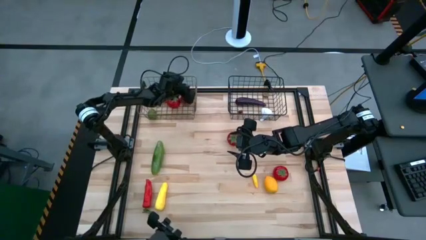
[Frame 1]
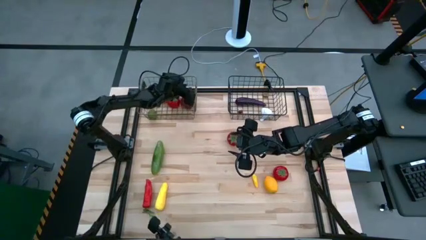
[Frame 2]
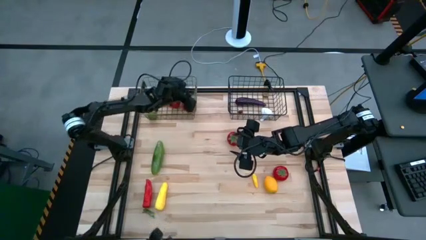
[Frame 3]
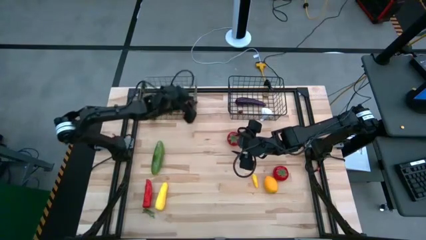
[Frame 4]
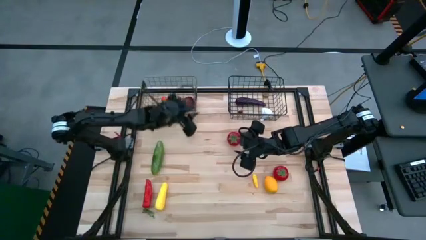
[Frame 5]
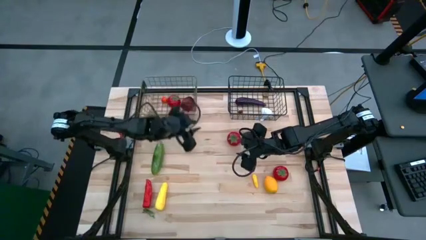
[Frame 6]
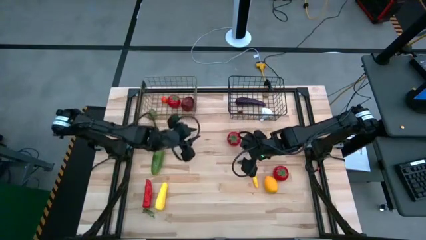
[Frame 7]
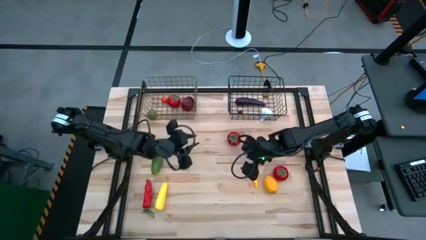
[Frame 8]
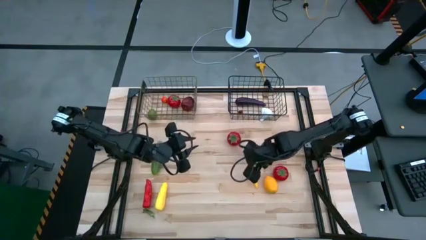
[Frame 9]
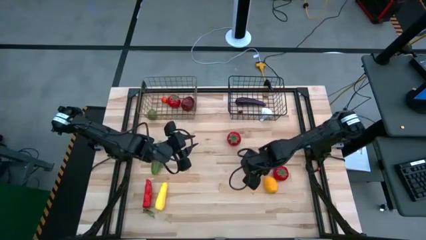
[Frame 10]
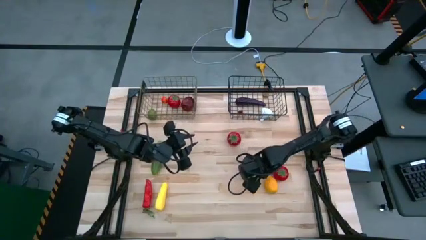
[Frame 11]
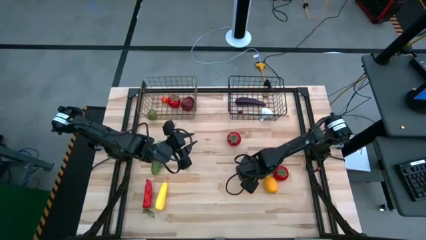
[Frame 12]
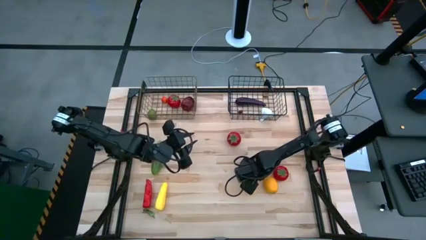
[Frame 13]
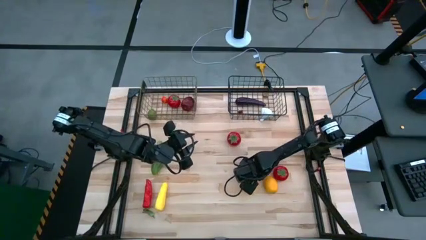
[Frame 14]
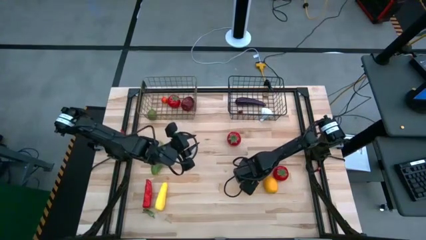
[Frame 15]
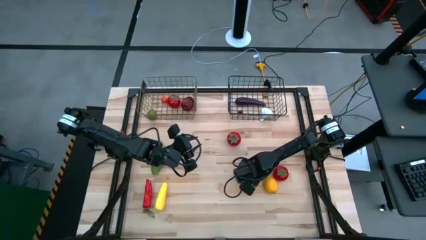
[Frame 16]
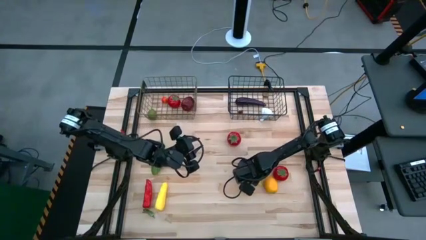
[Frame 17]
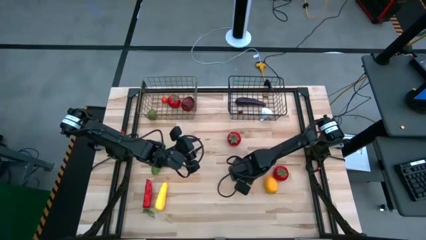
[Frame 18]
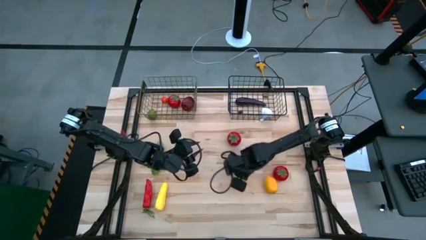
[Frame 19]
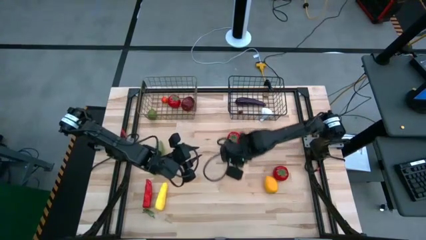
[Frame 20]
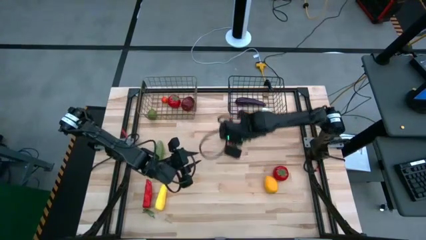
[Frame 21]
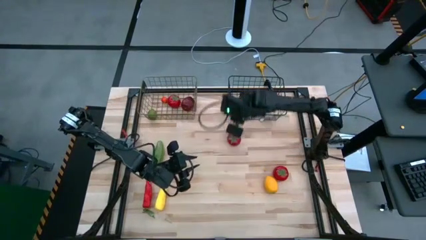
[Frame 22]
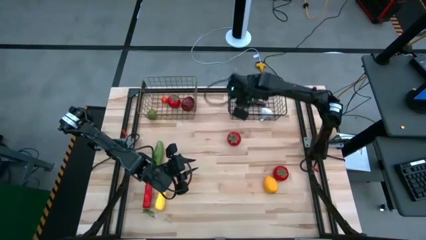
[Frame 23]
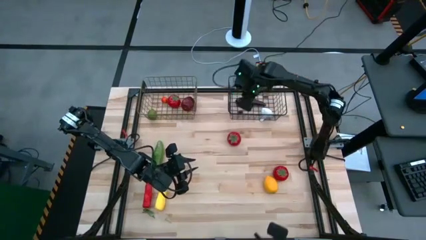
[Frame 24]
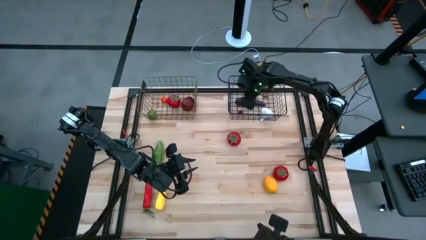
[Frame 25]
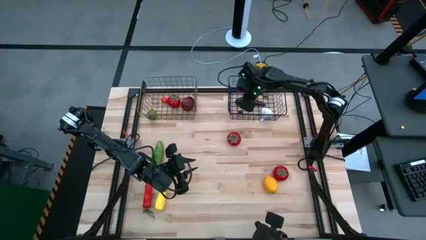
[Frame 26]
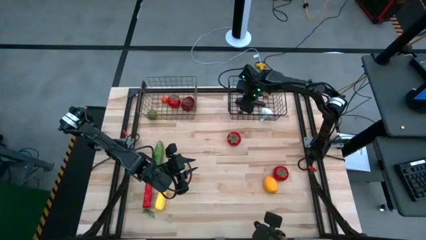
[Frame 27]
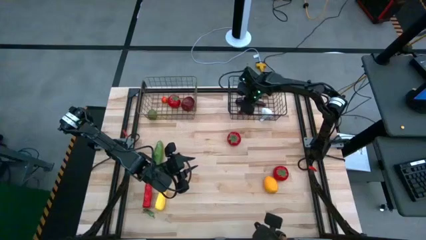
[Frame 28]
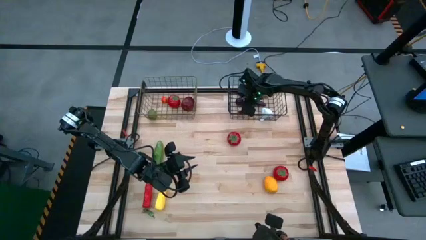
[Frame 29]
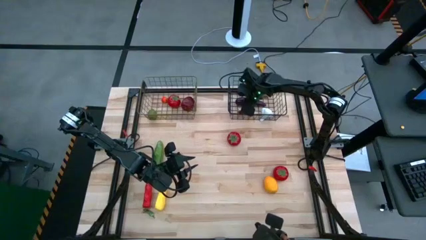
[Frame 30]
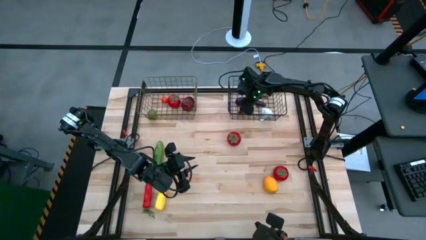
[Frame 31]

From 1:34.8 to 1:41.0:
Task: Sort produce into baskets
Put the small corn into the right wire basket

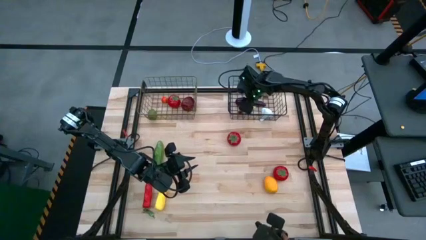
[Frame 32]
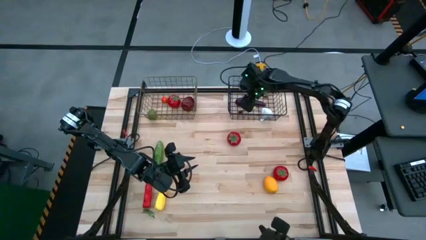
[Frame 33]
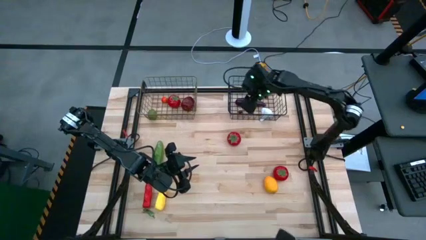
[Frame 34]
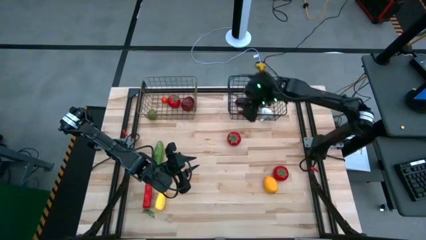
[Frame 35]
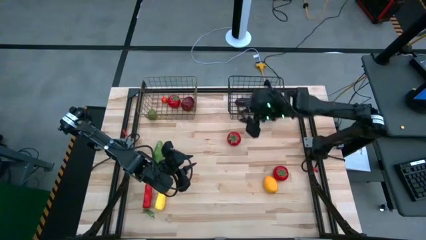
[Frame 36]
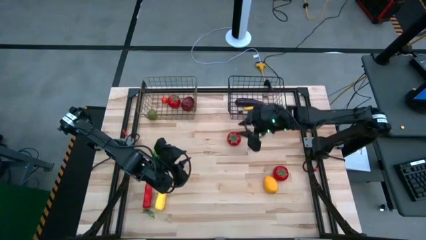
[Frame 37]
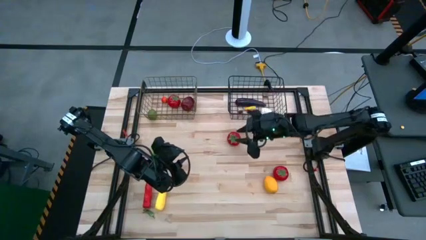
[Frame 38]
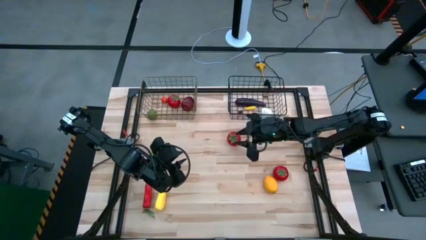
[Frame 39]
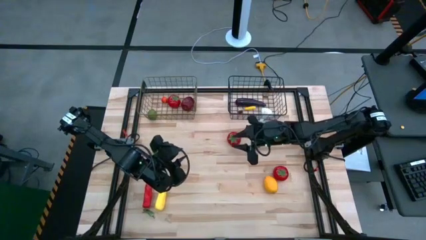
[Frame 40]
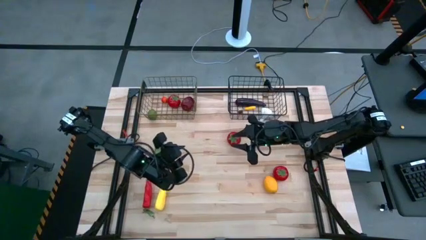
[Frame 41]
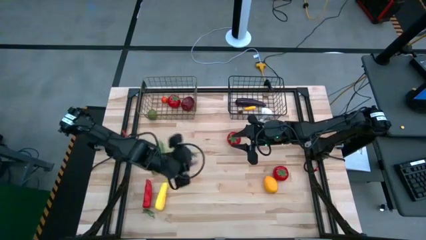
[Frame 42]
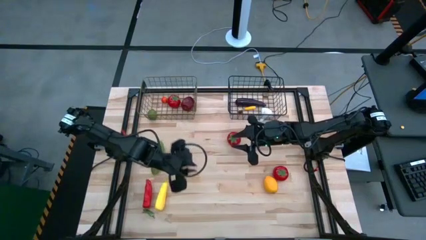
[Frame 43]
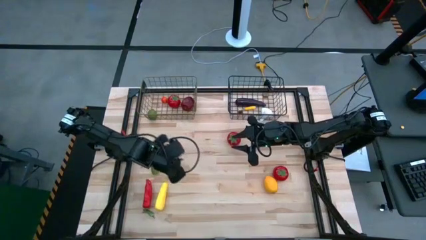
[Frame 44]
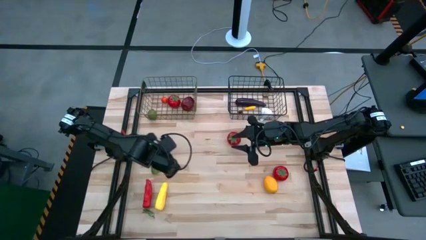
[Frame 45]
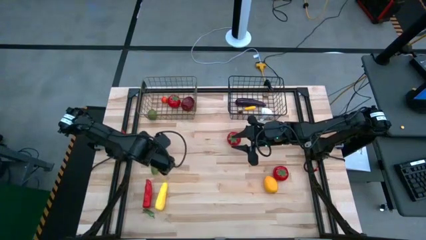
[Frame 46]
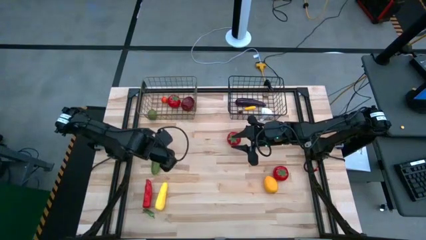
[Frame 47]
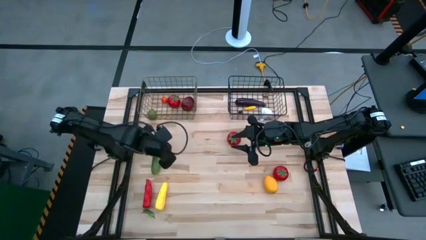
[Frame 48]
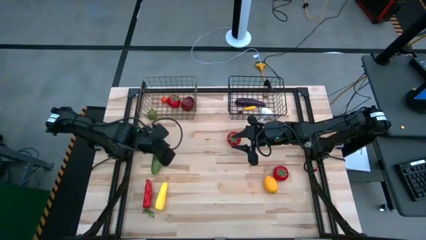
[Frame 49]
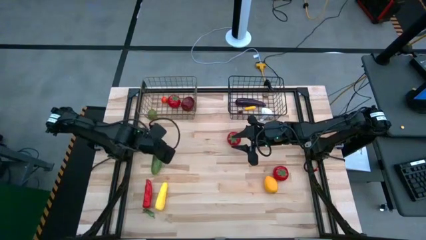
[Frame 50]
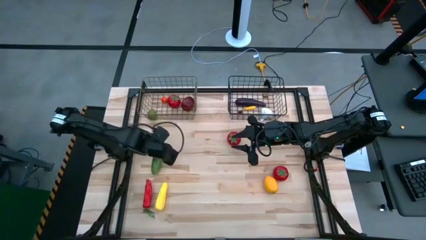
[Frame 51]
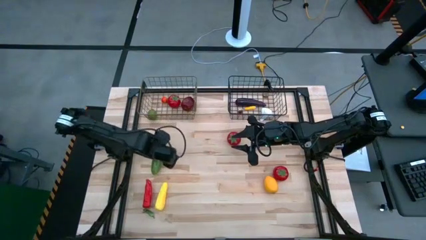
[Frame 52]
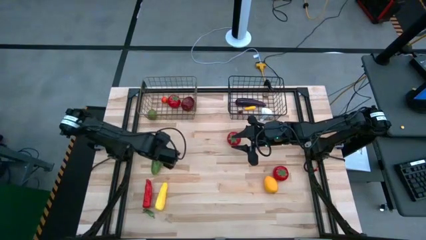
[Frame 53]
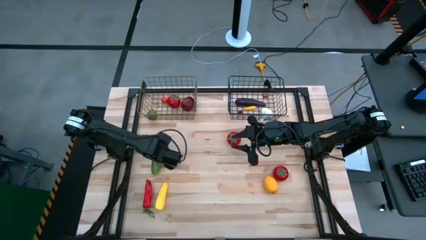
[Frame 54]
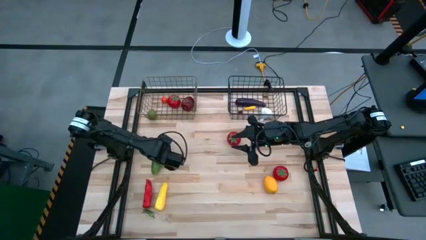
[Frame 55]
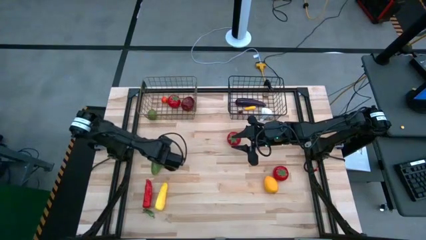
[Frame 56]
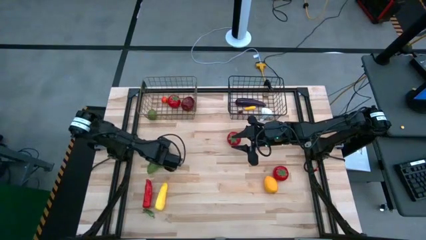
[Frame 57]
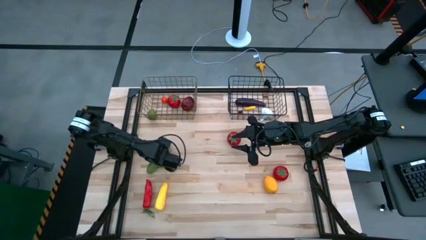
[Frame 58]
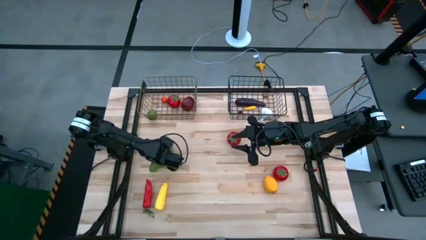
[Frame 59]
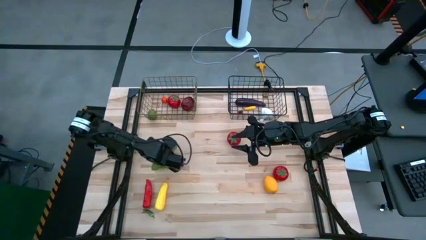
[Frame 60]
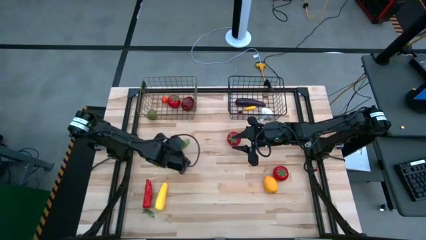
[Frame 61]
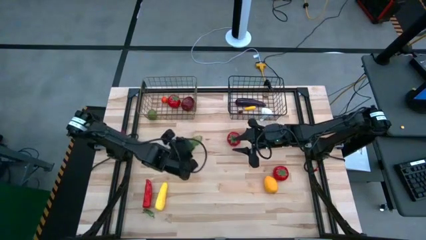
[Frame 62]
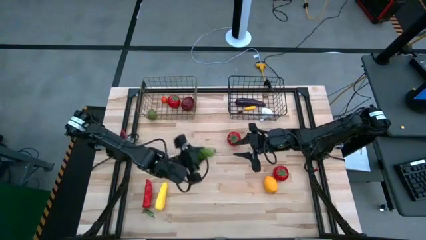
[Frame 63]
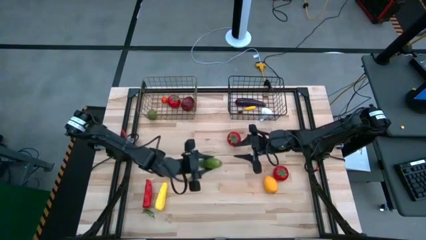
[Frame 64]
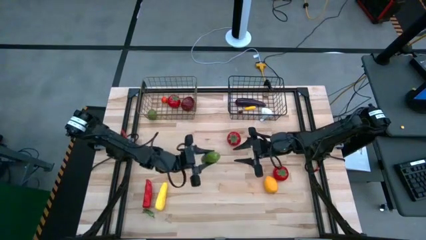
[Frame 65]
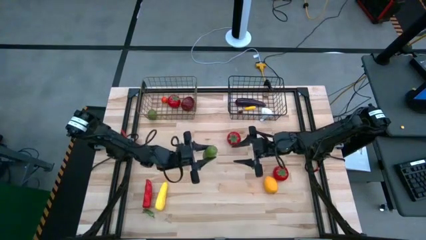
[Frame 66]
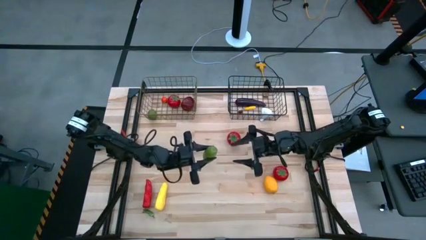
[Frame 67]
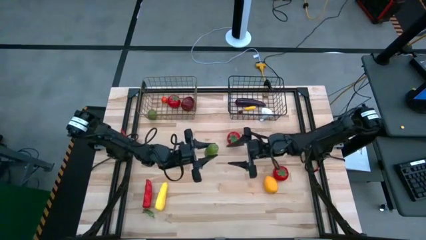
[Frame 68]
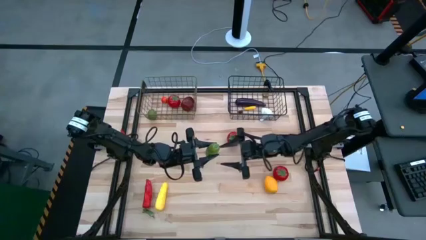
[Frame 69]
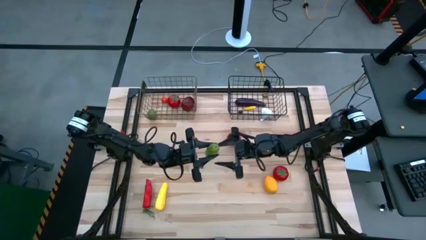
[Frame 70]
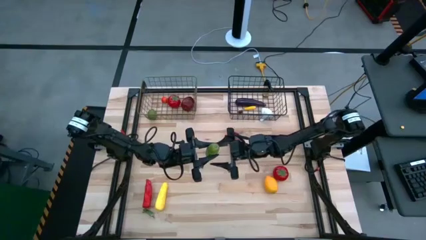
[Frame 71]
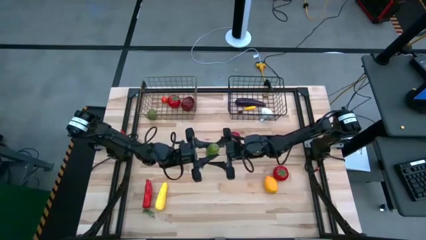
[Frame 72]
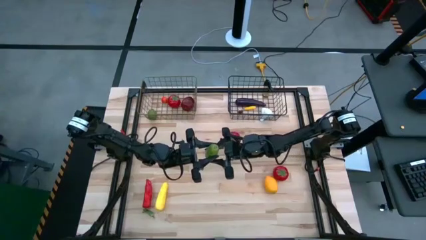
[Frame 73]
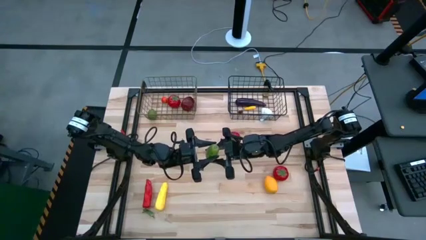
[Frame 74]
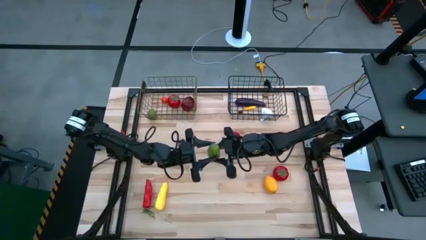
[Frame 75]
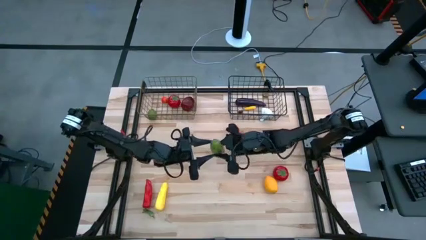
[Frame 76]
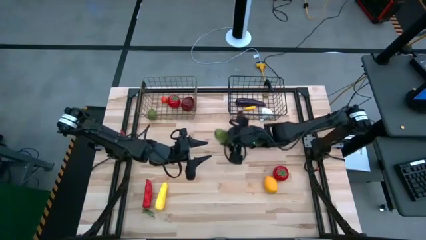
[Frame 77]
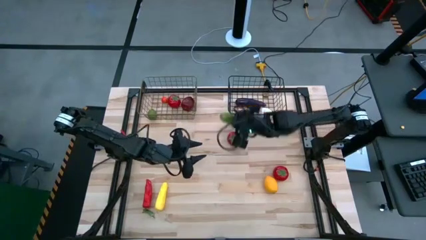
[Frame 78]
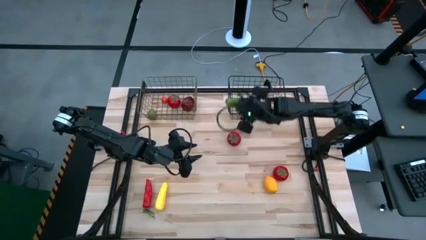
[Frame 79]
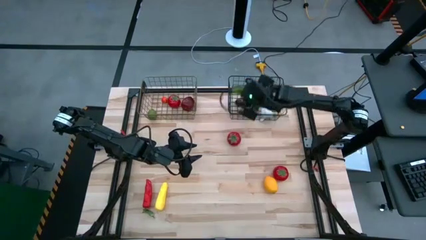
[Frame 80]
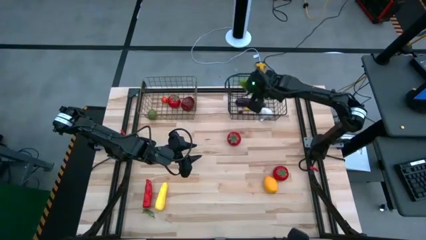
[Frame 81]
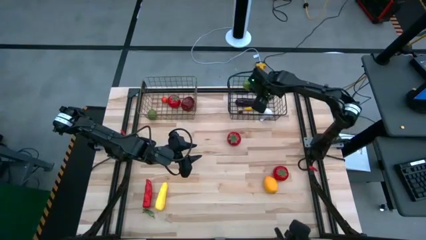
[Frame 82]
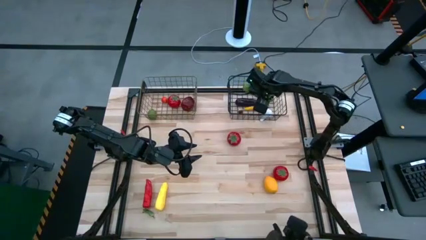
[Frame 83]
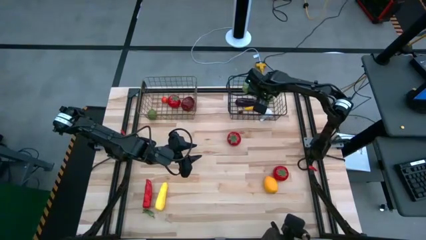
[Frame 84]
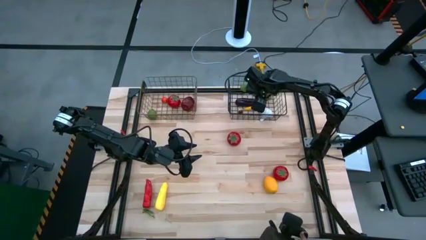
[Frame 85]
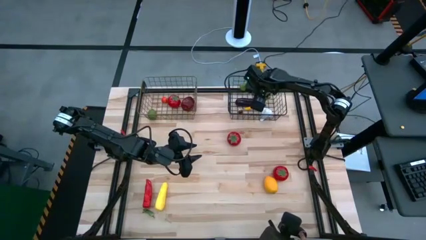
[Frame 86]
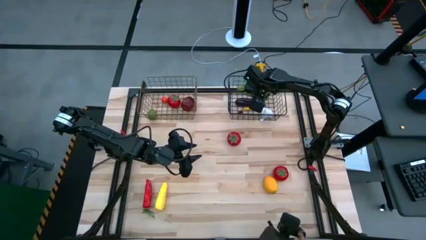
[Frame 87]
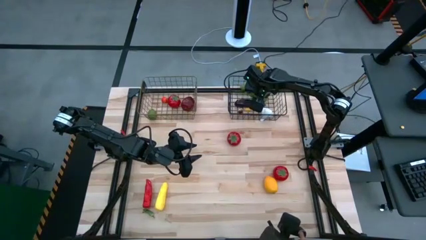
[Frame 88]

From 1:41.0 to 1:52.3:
Put the cucumber into the right wire basket
